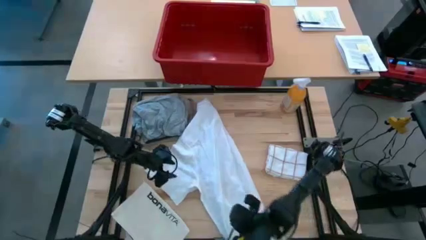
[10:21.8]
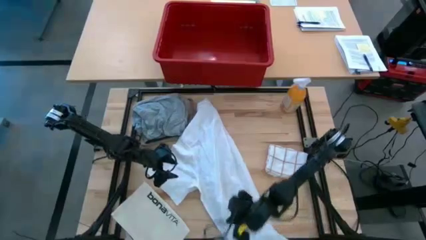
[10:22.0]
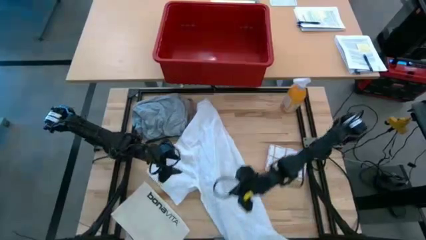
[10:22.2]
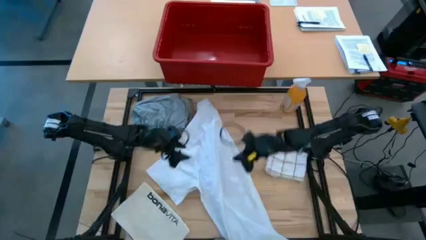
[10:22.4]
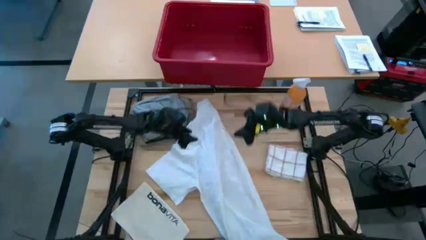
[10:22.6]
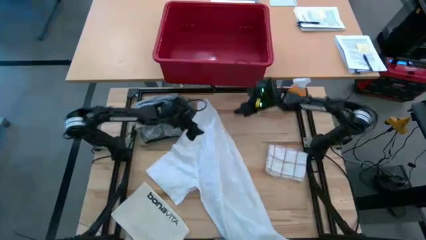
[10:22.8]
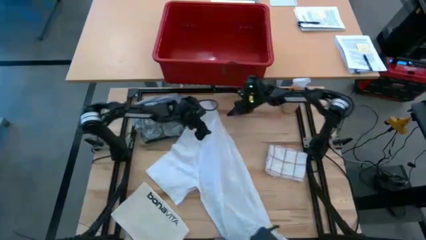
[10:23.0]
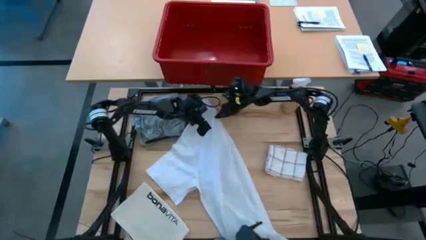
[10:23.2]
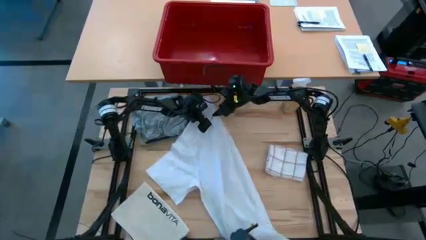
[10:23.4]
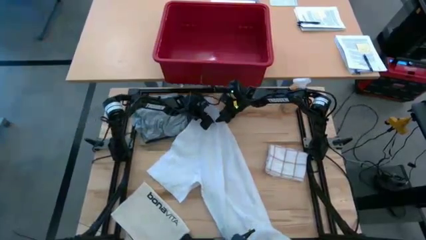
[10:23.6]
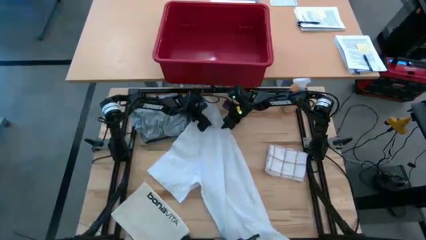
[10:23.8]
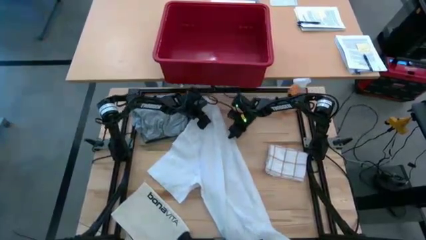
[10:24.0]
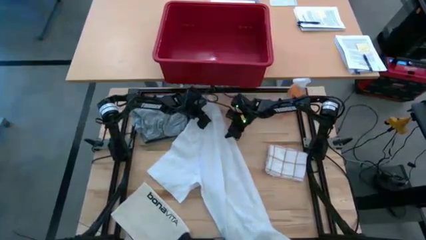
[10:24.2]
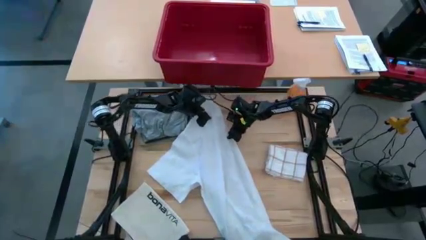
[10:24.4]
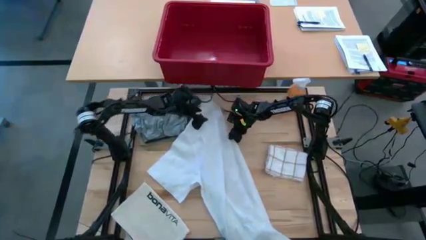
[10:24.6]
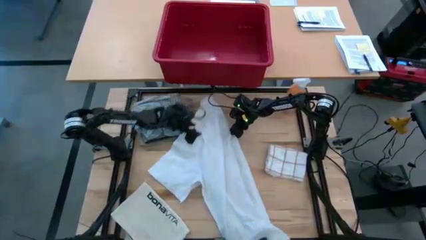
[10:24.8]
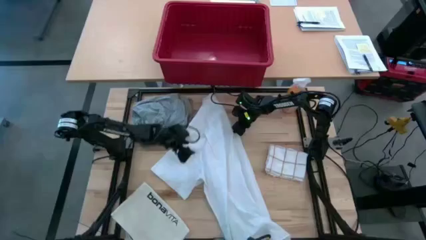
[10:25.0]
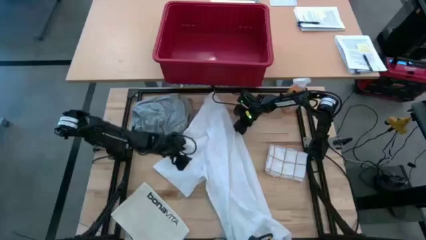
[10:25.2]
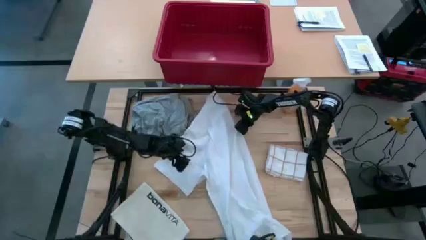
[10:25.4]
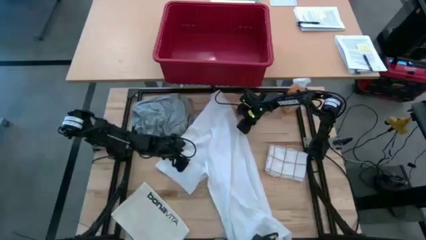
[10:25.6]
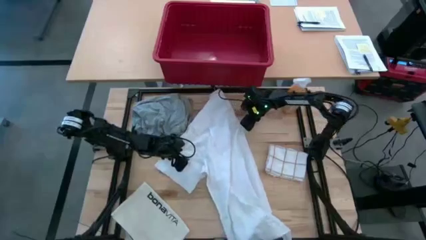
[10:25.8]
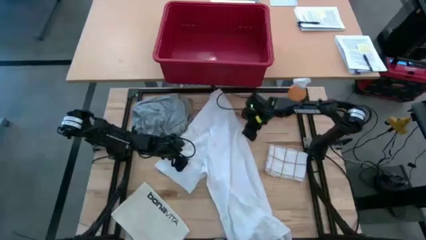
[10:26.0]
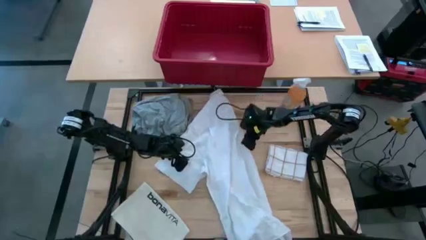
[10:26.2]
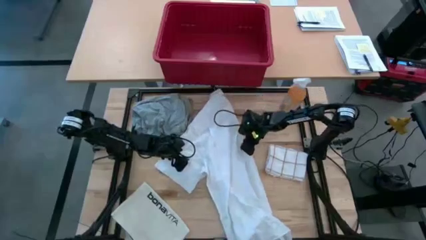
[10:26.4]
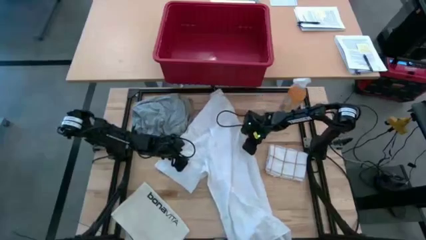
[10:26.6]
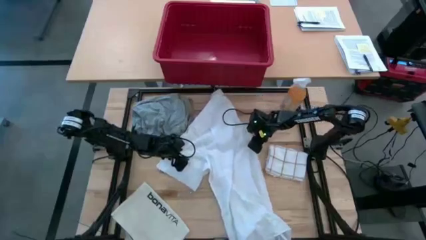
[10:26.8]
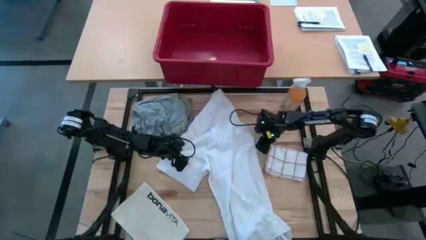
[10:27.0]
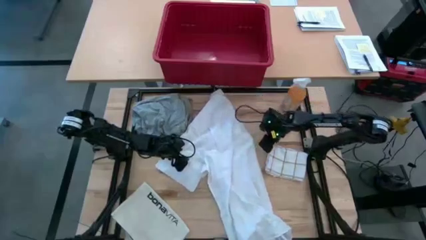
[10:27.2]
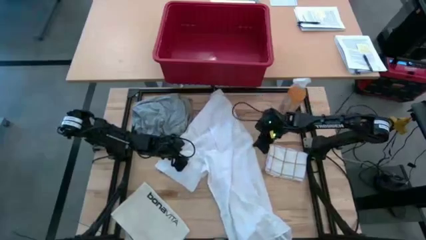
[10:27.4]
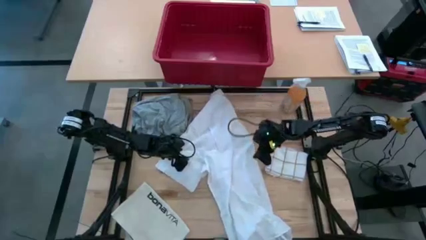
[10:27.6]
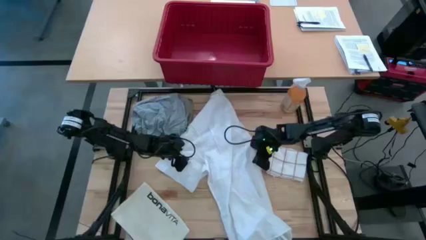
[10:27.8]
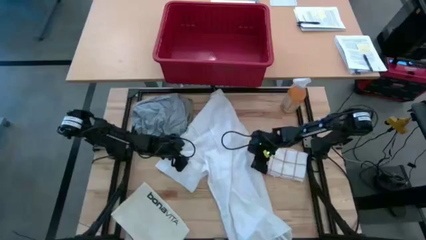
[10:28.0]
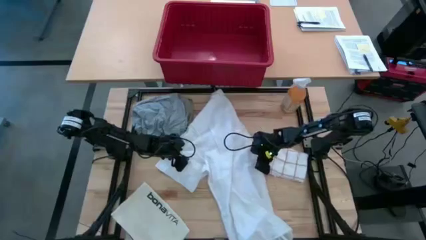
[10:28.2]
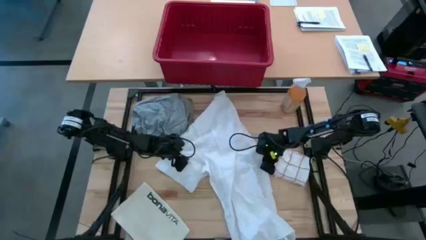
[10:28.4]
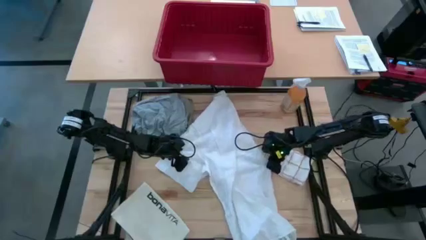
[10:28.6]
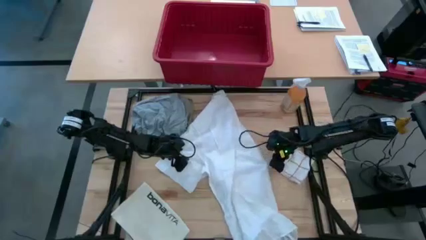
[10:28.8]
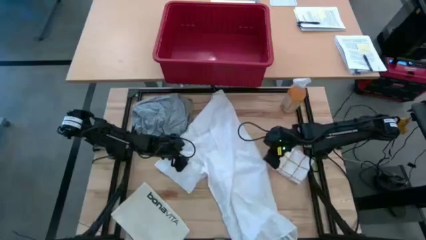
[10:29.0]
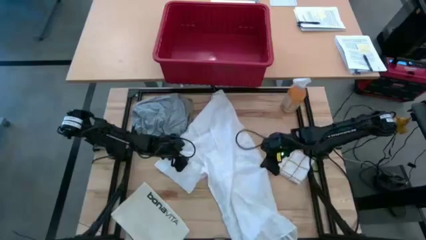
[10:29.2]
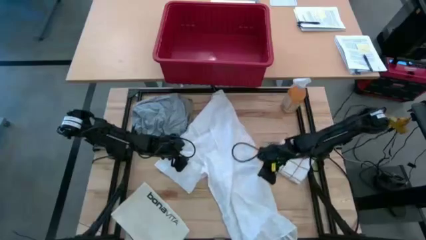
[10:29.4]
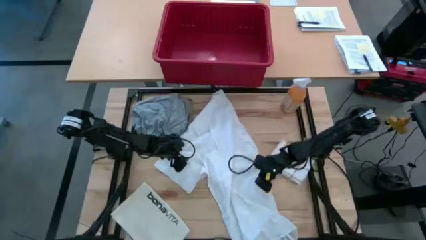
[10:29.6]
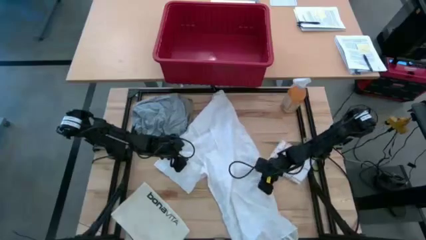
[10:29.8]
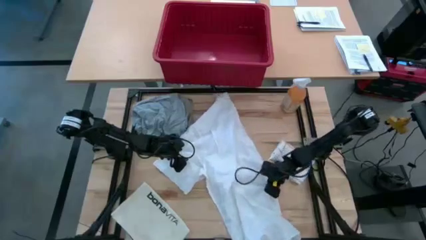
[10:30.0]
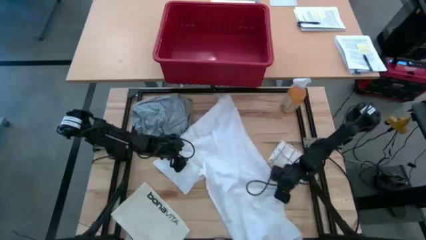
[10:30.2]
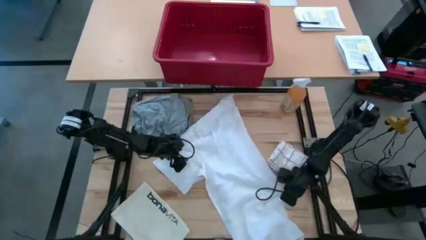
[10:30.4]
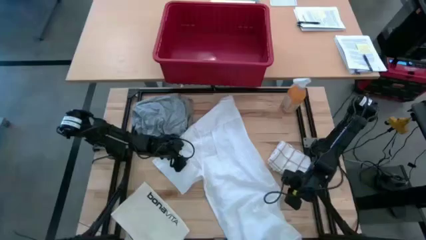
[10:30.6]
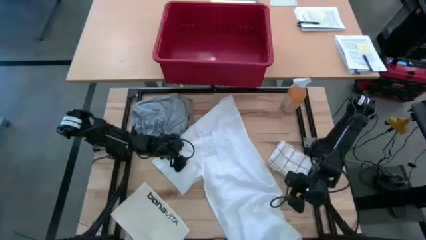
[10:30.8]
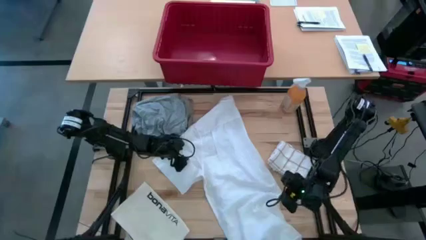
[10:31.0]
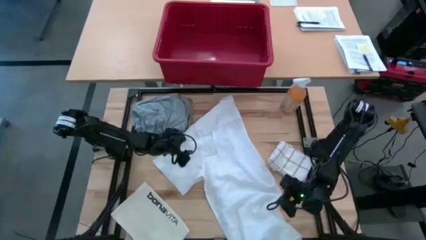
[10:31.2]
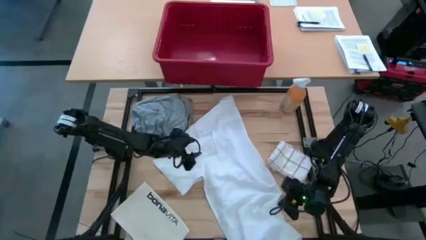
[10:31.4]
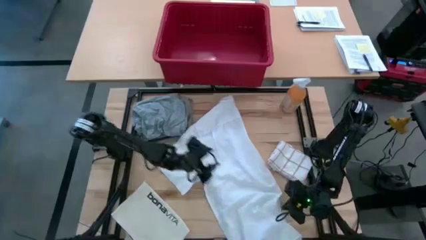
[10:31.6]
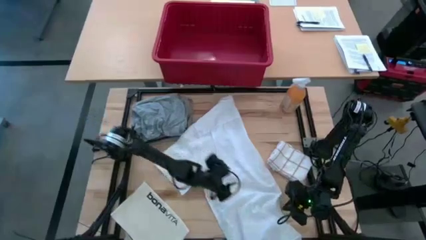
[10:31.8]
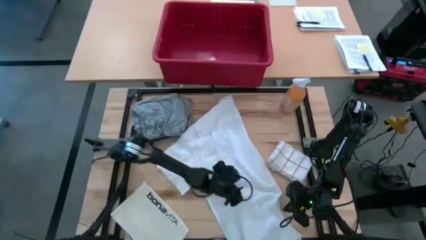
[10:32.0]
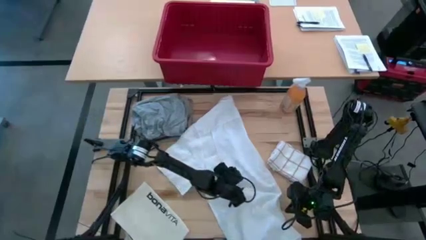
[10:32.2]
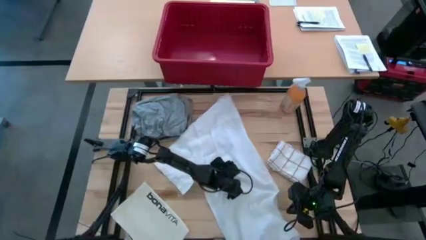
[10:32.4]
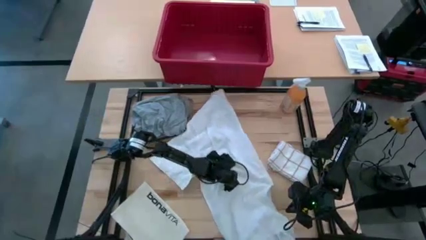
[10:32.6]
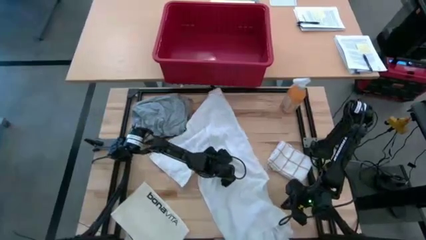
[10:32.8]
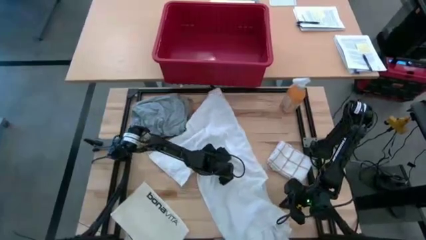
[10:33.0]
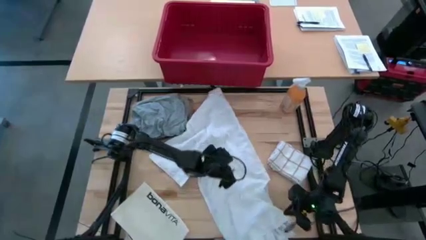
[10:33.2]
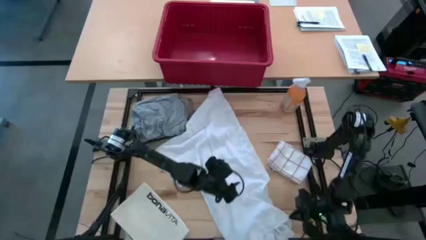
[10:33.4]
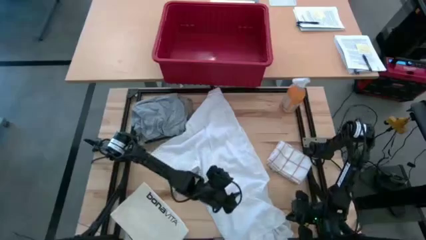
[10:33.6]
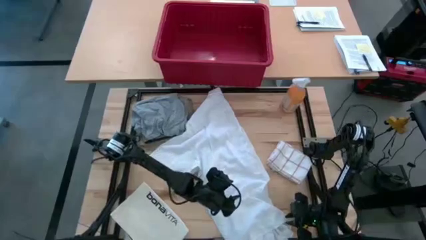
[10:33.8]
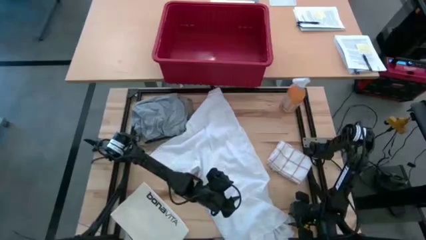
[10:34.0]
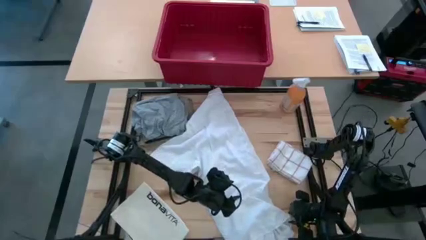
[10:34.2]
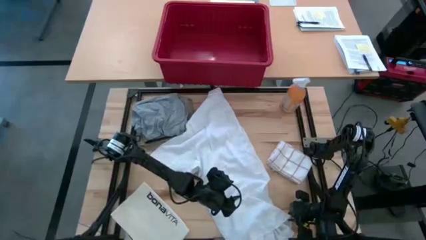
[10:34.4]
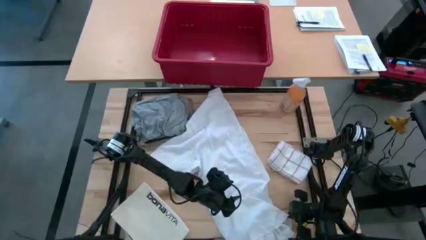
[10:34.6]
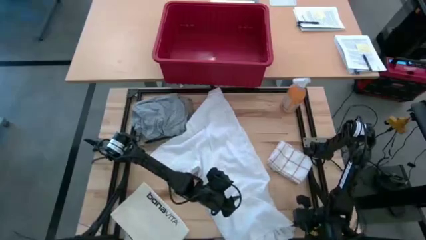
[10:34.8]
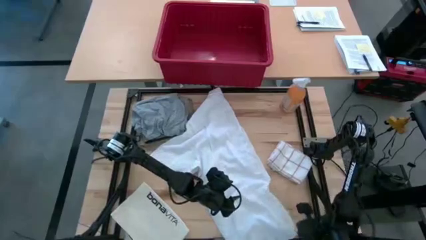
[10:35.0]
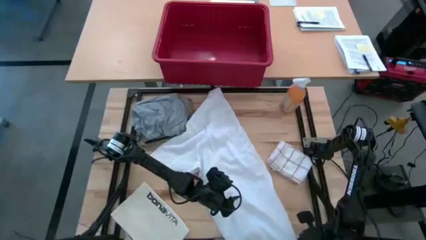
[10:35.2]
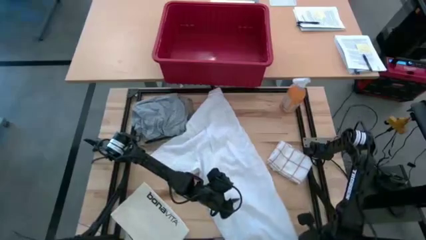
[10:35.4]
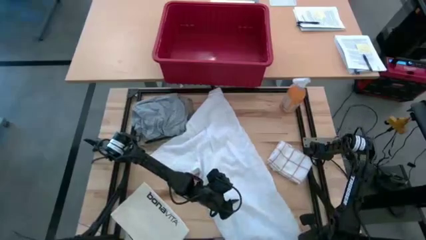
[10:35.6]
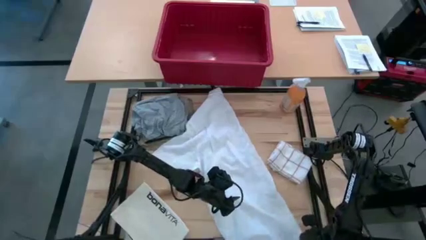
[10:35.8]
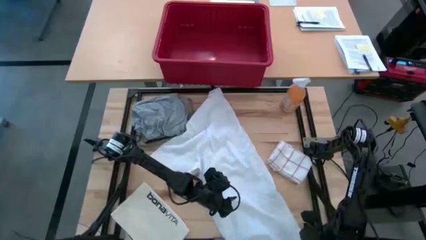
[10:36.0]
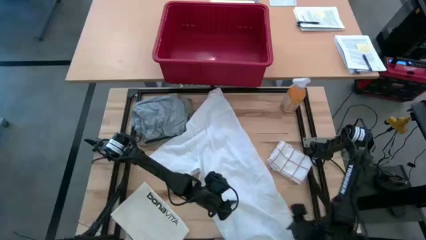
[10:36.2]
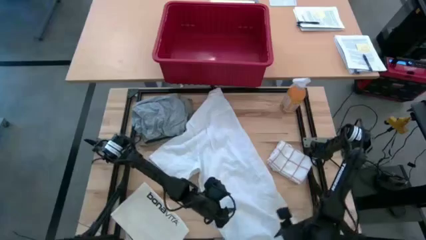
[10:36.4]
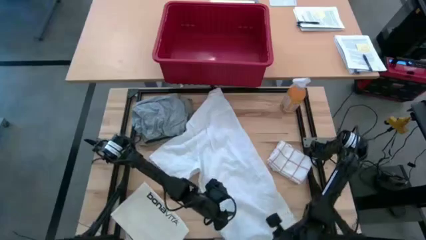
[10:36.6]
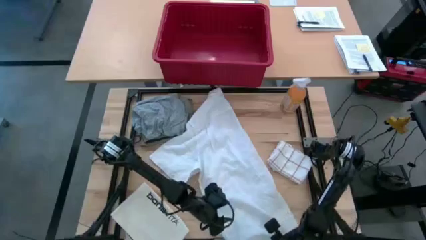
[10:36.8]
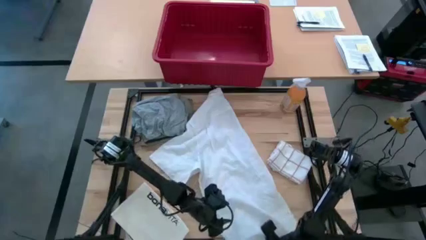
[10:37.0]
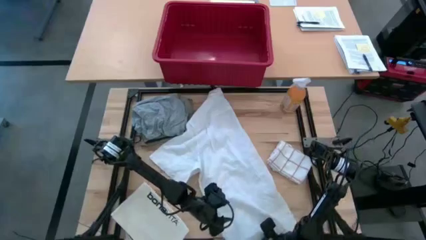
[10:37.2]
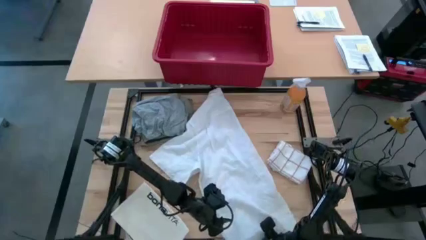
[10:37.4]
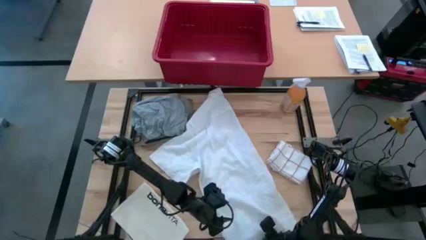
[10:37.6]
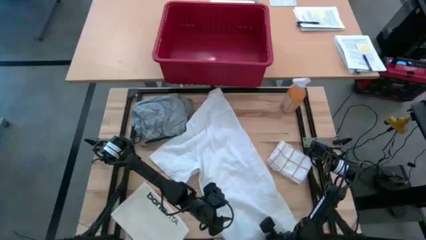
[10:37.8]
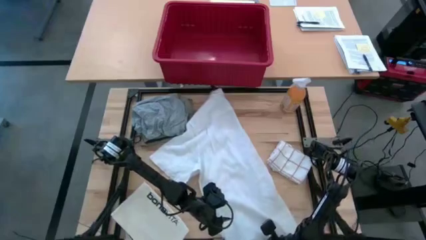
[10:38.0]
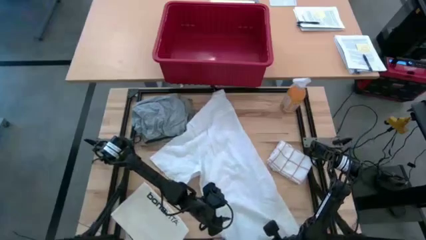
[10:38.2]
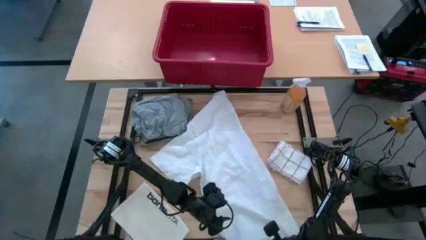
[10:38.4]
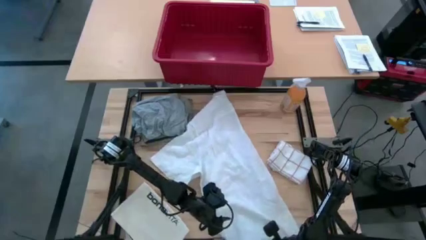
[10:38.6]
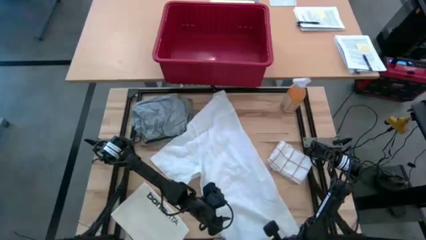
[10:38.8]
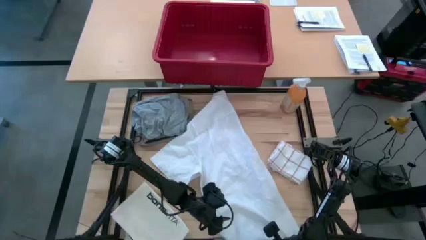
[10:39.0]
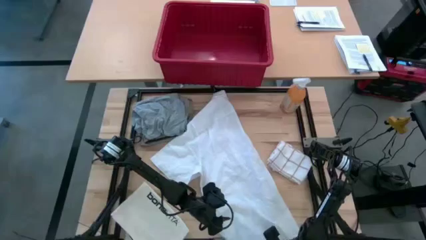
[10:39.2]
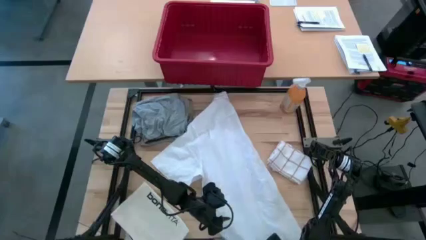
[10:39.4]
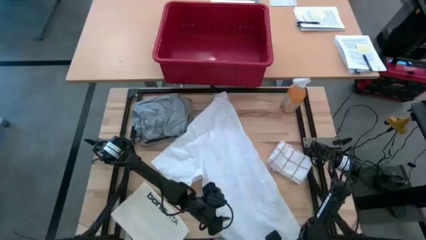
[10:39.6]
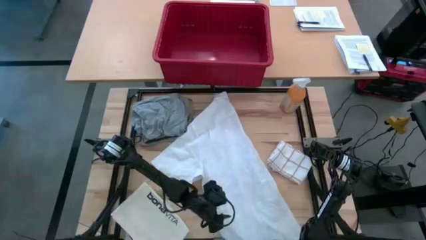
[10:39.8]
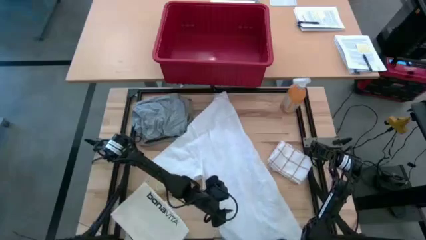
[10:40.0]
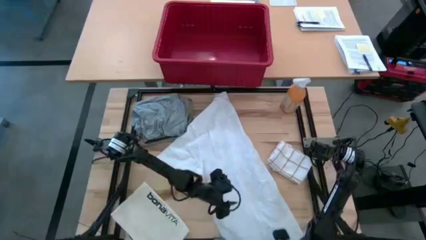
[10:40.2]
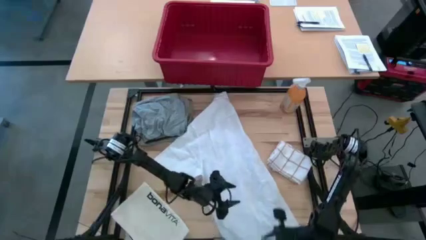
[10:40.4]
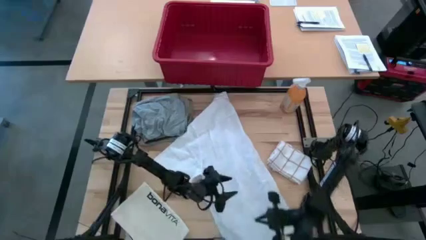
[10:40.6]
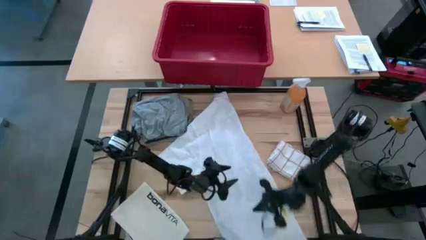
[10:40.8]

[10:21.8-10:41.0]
Task: Fold laundry
Fold the white long sleeve shirt
